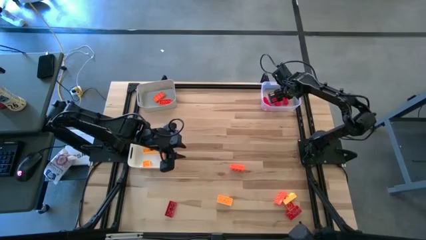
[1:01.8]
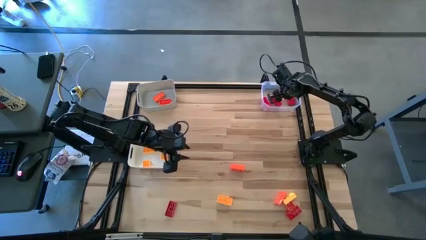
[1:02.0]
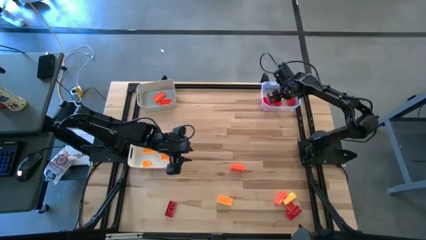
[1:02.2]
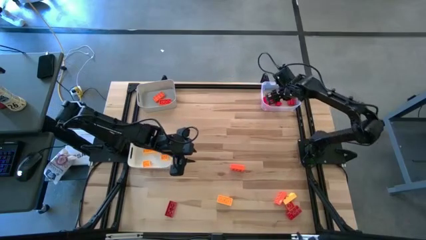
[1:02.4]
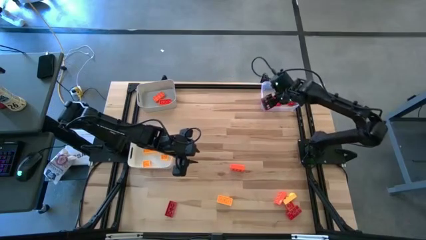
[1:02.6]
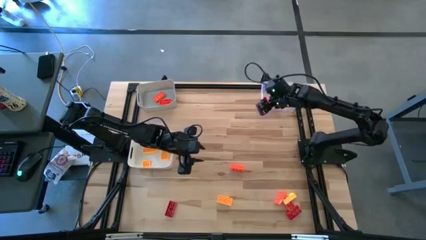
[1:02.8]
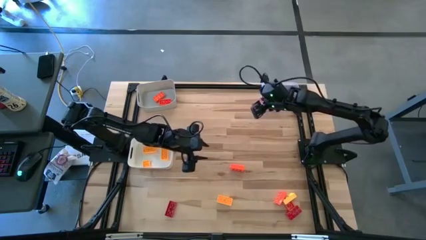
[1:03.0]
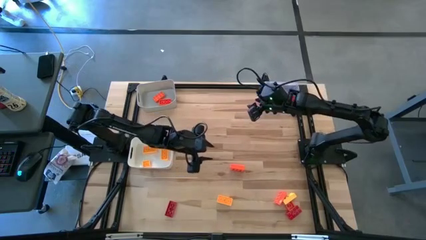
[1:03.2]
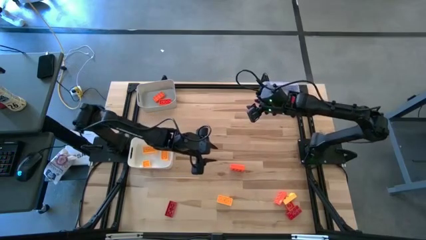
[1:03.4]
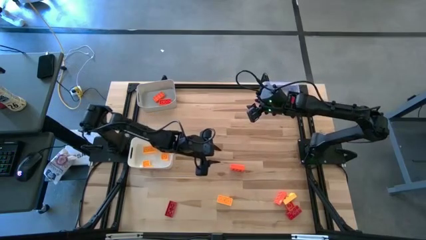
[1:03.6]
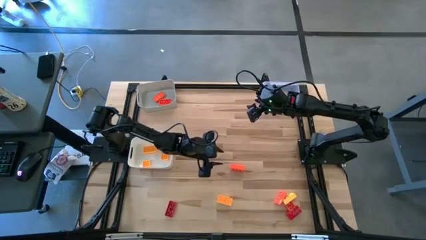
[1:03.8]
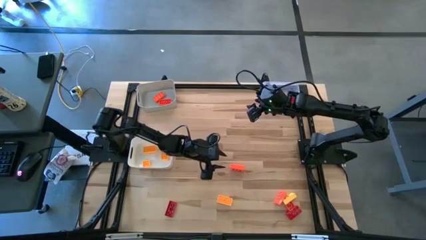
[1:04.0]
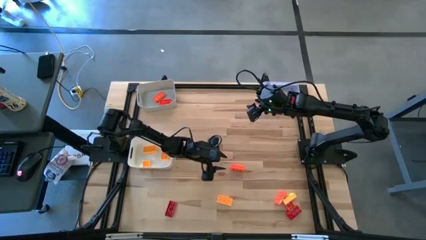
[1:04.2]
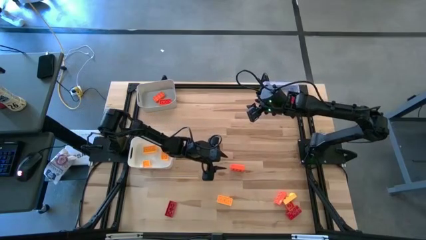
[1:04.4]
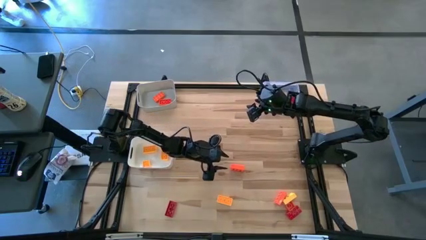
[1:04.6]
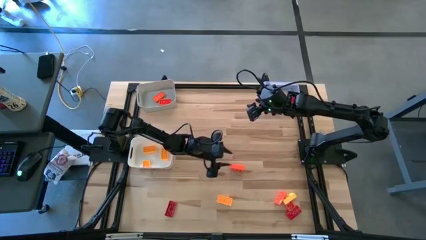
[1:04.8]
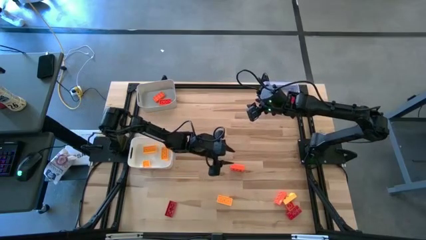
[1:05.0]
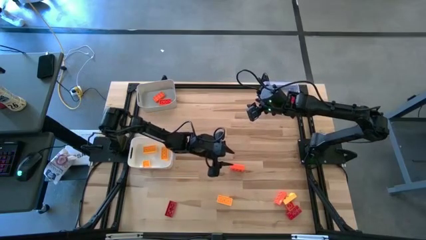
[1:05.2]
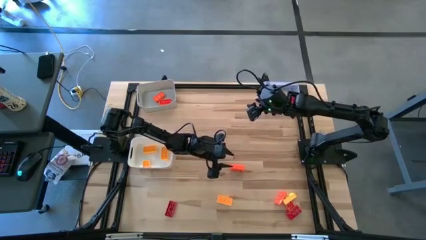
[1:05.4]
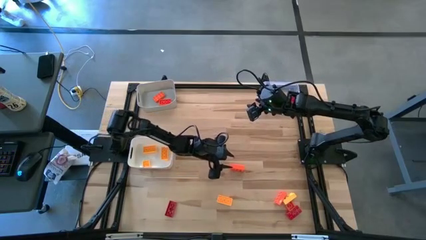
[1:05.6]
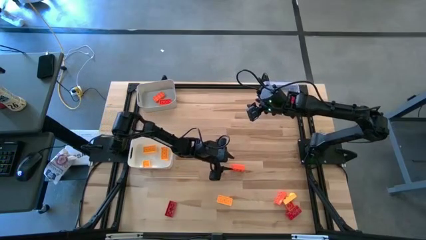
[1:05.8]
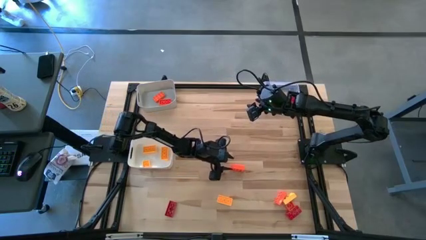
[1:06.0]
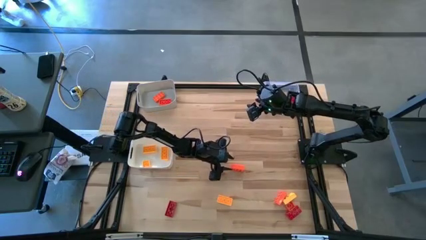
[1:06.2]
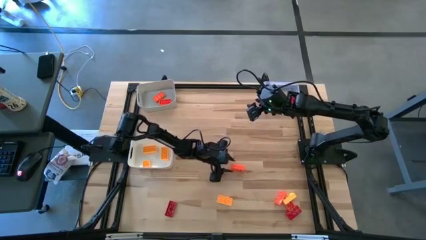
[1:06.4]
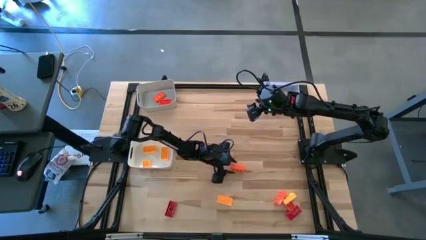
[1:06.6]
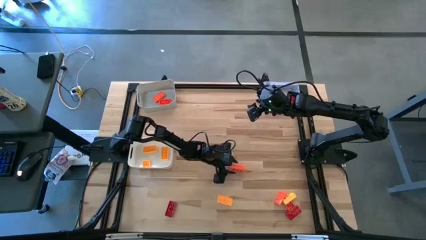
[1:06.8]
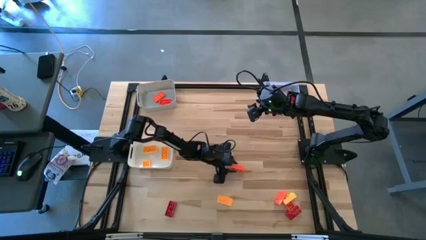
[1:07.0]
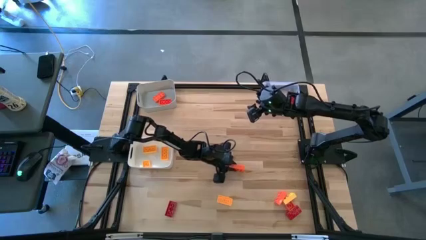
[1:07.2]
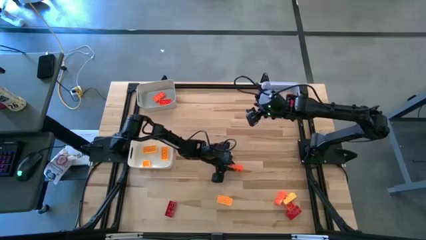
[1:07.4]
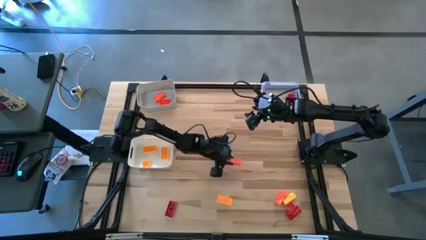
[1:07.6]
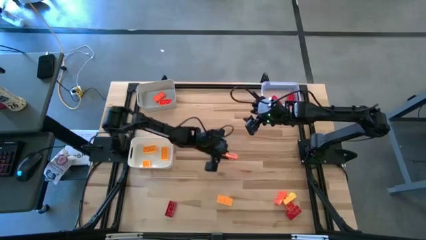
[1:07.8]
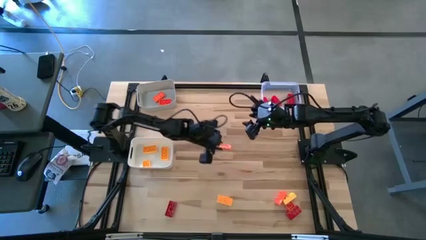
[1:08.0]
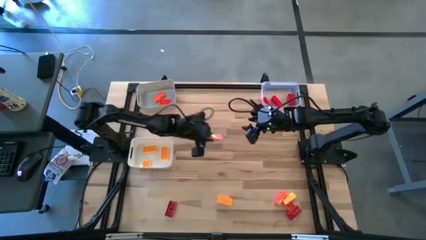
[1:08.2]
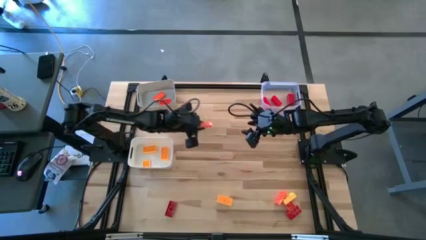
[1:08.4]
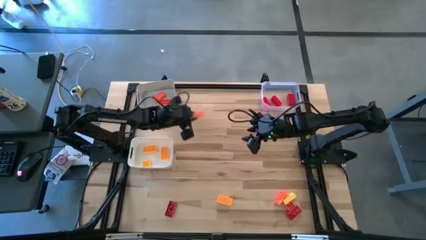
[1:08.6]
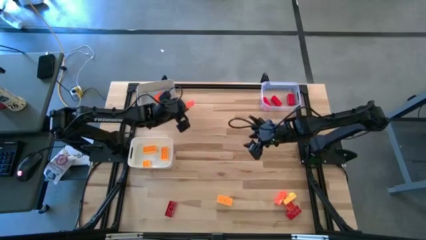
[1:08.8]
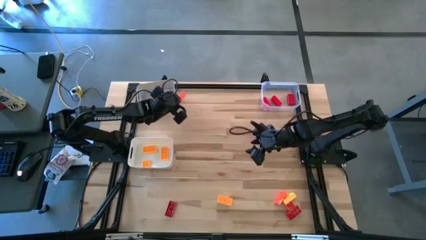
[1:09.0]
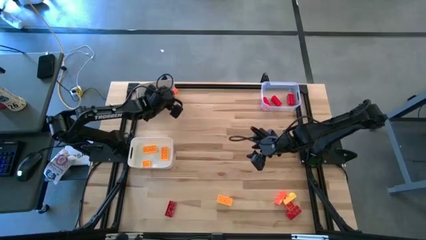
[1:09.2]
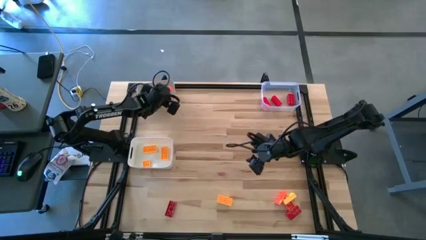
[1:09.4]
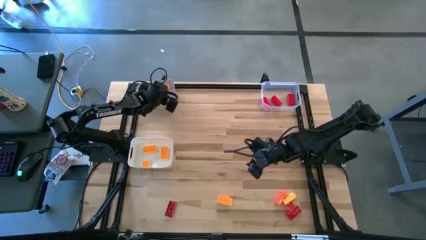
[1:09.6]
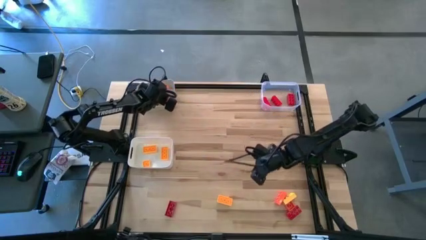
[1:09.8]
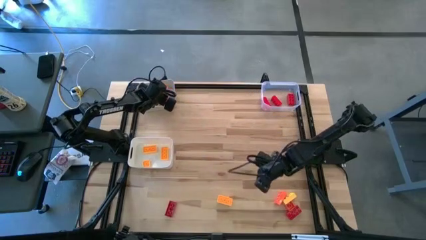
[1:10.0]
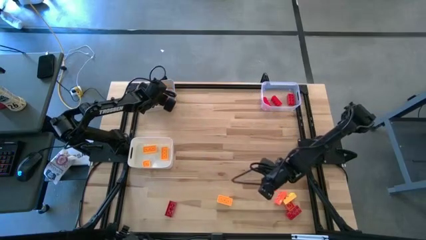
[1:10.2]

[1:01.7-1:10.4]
Task: Sort & place blocks by color
Put the orange game piece into the gray bin

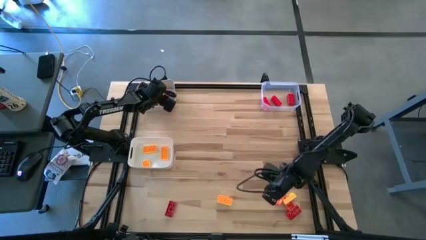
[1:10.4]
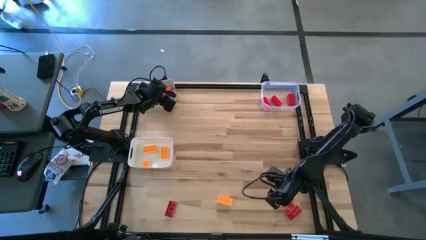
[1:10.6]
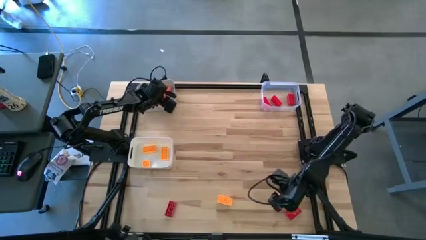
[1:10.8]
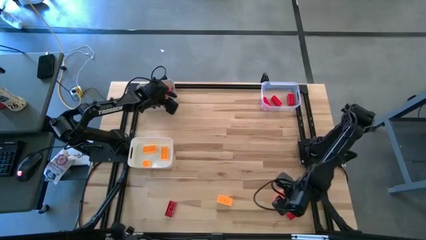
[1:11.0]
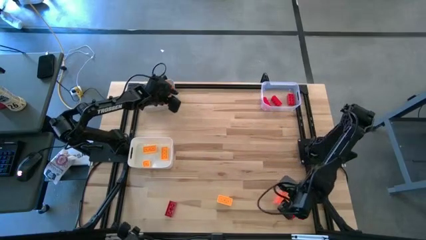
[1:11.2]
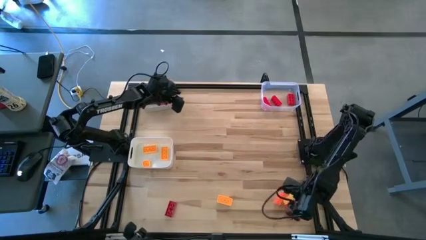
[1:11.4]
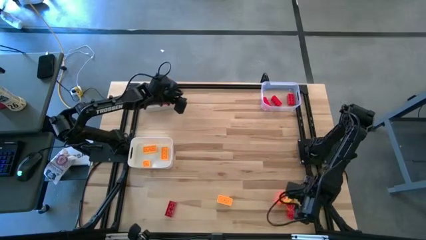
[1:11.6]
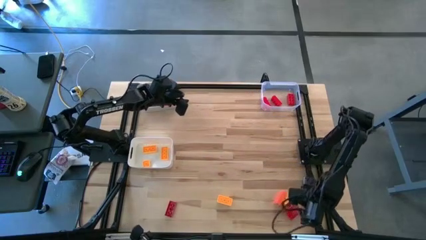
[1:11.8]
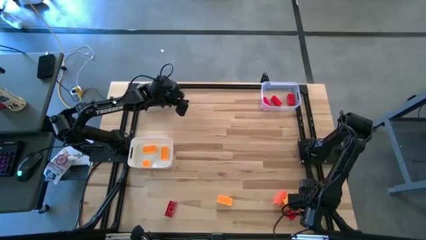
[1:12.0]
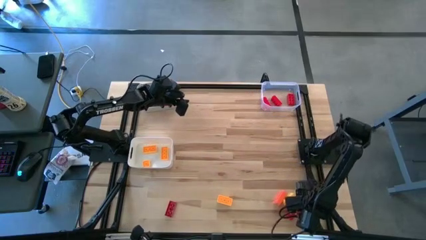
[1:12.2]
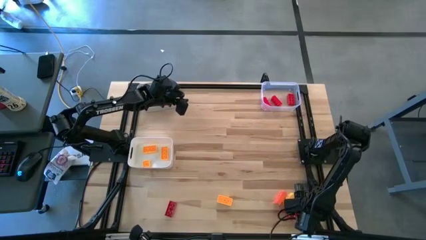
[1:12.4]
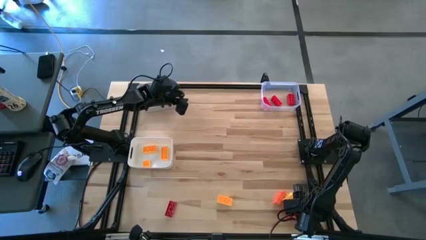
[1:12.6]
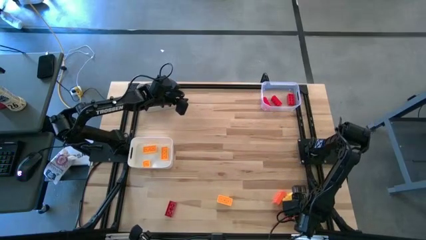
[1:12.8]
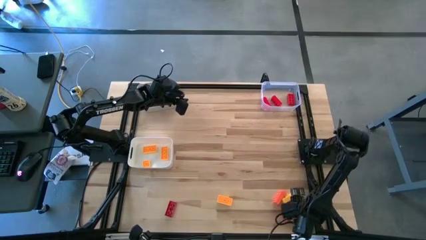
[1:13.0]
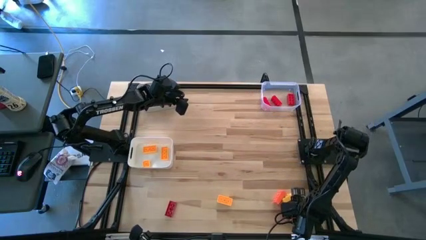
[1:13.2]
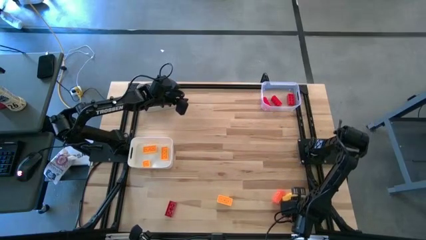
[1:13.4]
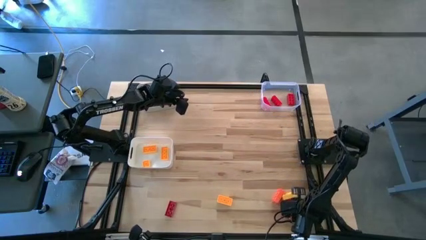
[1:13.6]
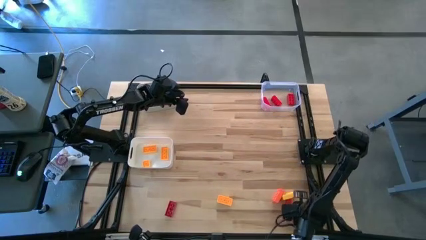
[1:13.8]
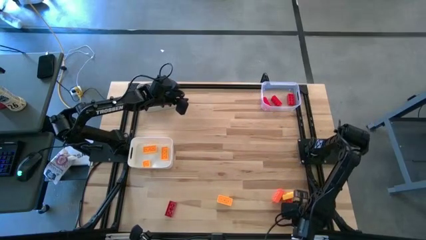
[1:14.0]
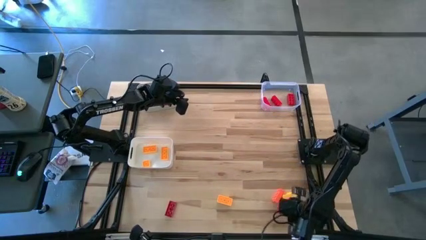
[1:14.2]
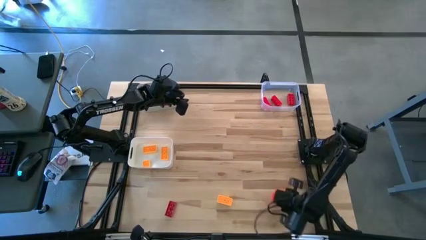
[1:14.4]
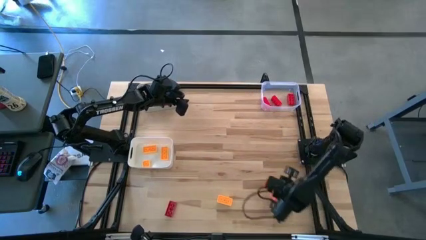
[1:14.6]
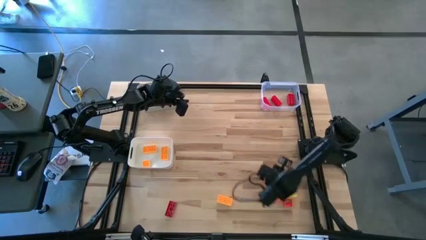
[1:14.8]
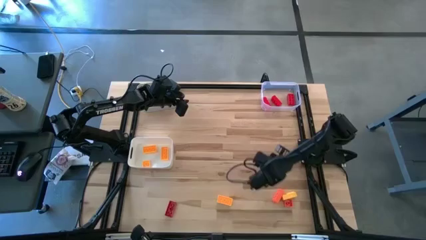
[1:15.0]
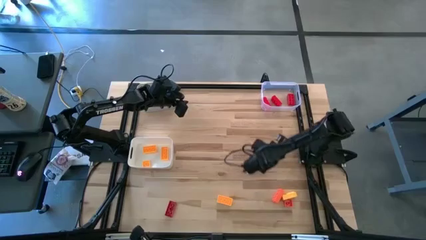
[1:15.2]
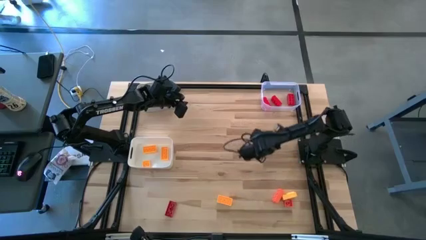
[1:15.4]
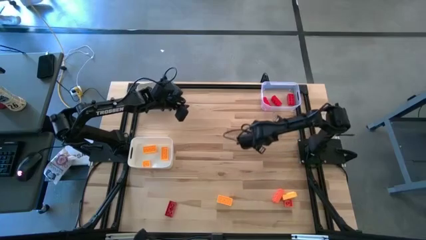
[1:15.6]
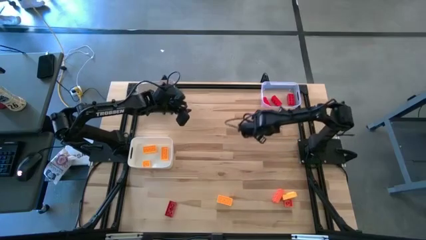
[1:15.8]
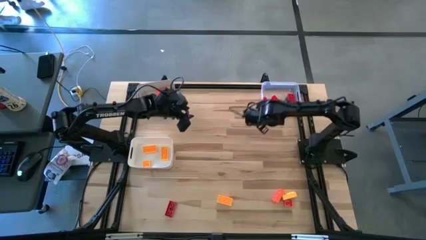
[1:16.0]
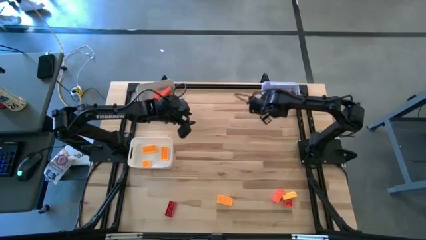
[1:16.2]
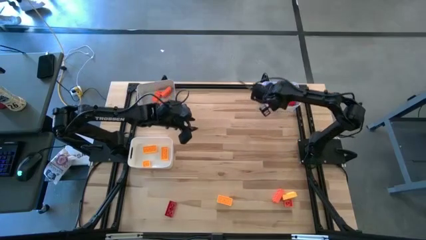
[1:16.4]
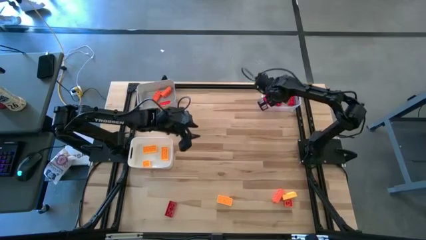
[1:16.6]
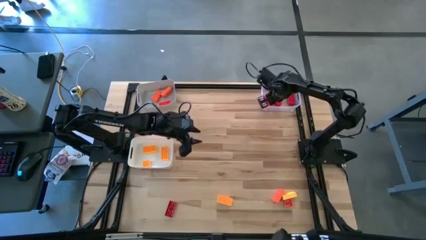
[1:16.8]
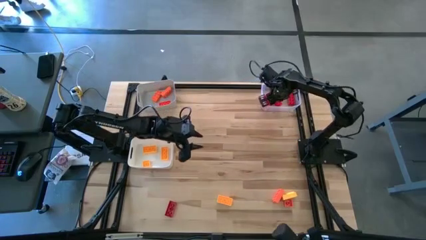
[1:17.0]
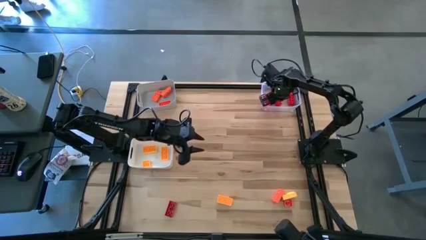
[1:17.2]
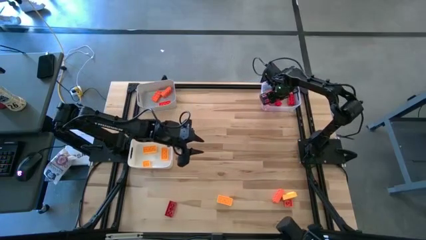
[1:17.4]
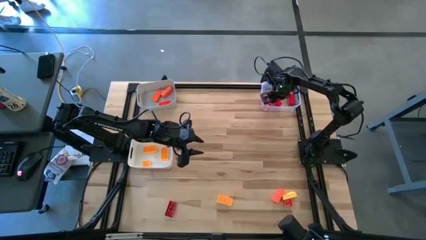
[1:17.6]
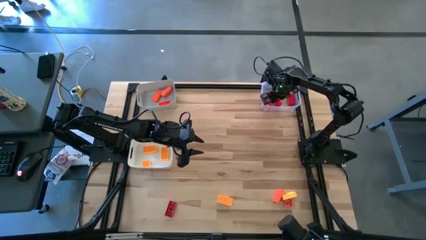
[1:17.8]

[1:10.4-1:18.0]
Put the red game piece into the transparent bin

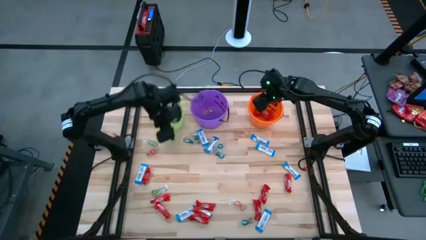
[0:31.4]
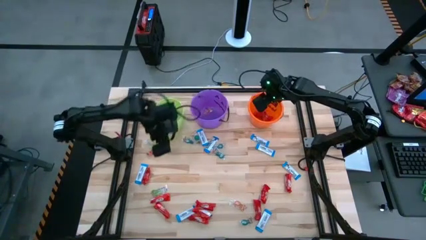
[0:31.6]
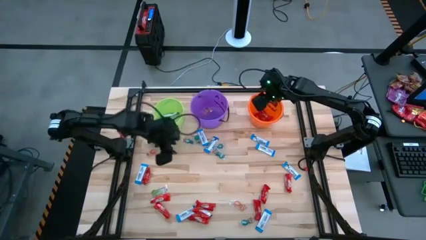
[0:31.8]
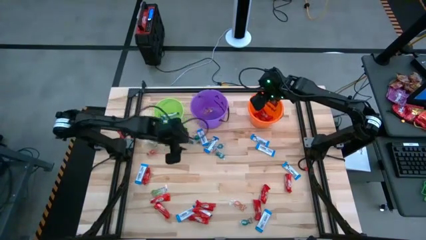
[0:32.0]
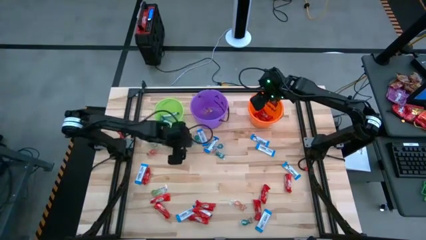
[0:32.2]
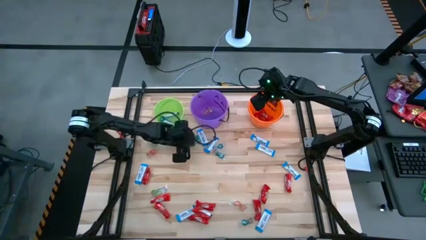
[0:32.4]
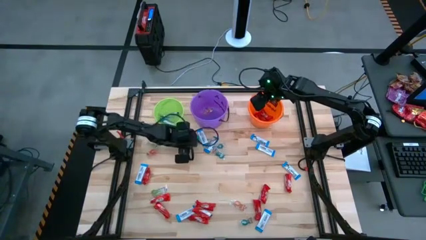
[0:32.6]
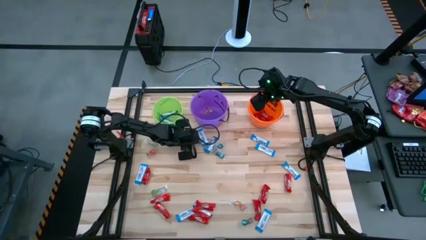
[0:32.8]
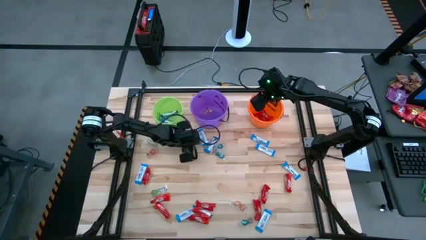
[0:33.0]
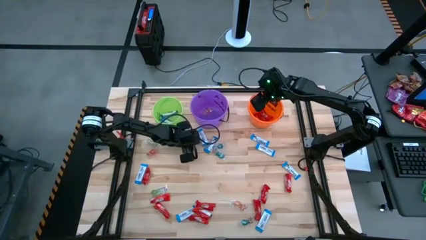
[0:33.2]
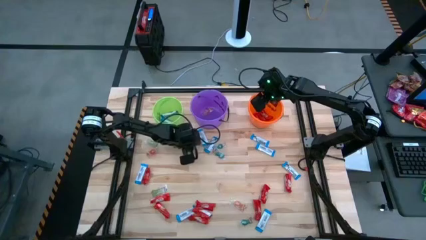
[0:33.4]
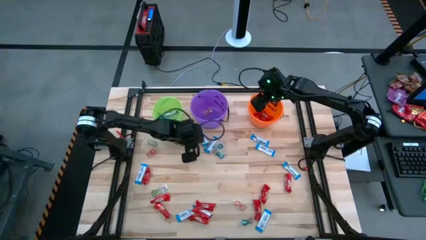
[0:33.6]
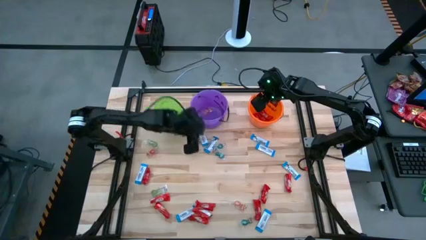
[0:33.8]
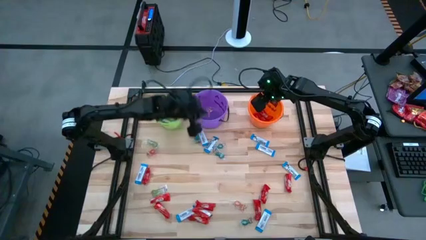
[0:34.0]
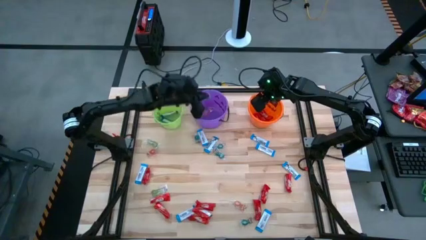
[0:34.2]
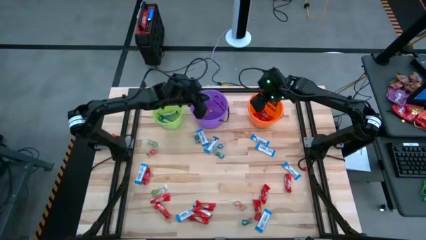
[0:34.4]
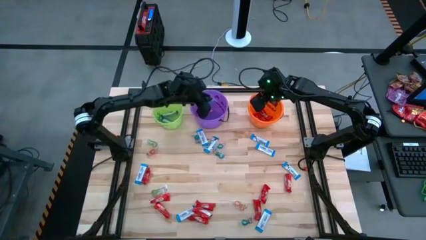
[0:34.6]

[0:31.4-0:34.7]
Task: Sort candy by brand, put in halloween buckets
Put the blue gummy into the purple bucket
